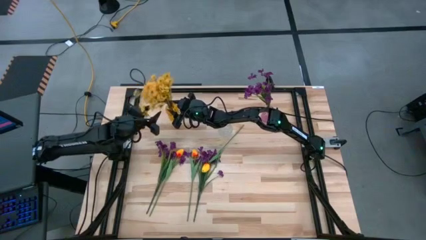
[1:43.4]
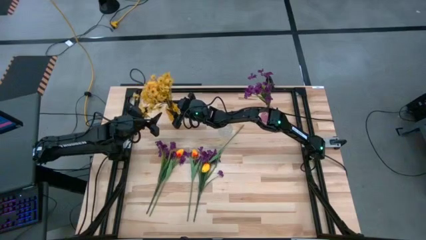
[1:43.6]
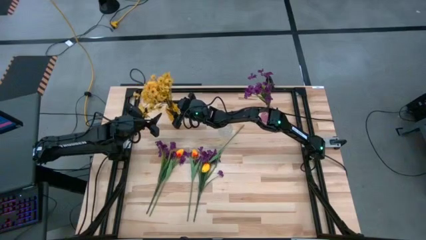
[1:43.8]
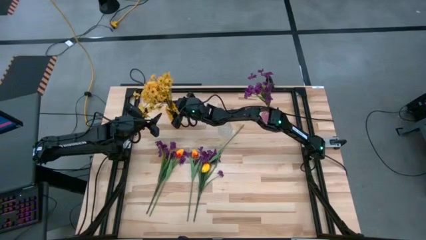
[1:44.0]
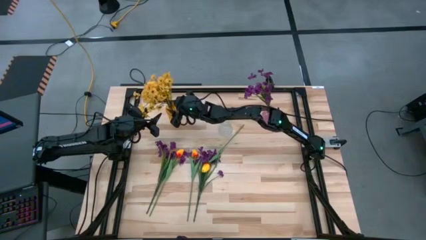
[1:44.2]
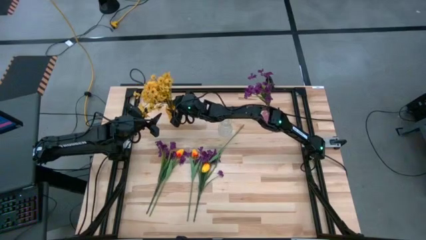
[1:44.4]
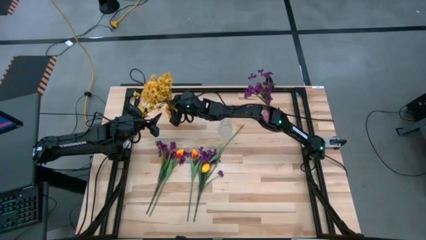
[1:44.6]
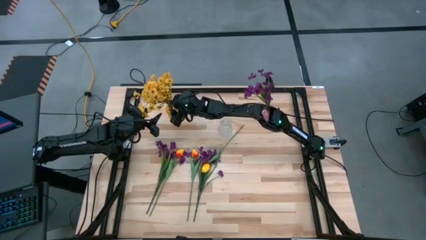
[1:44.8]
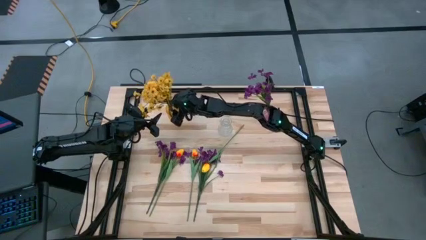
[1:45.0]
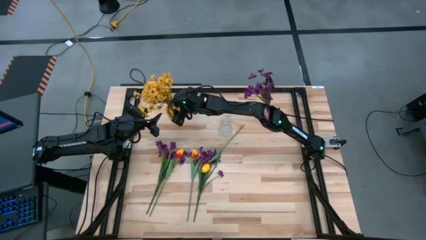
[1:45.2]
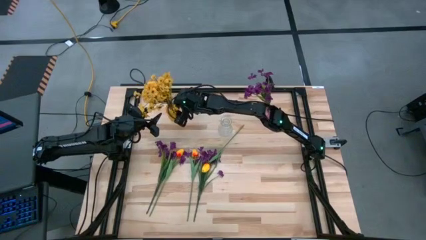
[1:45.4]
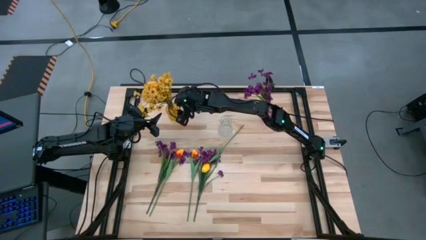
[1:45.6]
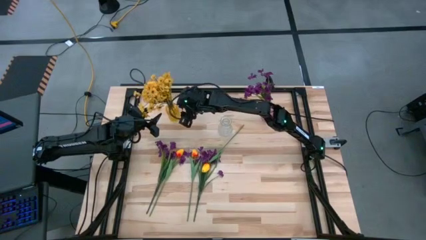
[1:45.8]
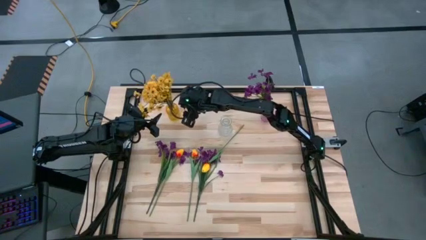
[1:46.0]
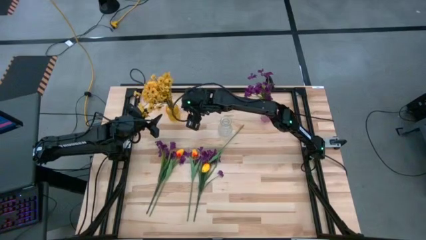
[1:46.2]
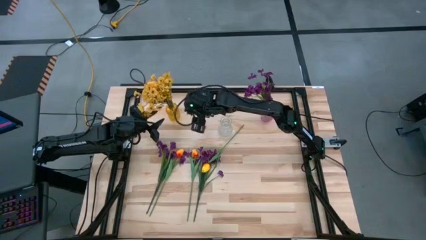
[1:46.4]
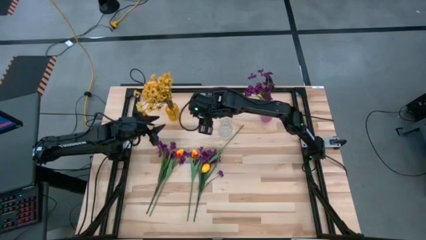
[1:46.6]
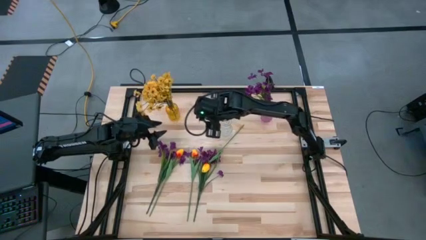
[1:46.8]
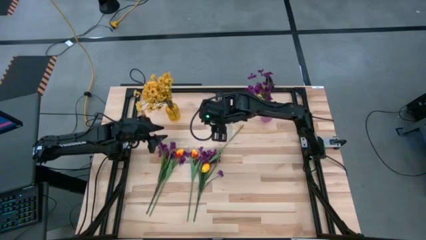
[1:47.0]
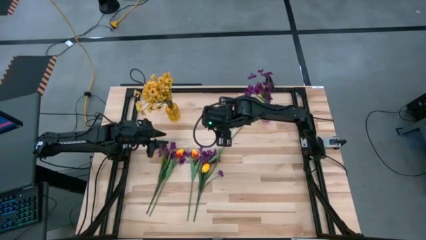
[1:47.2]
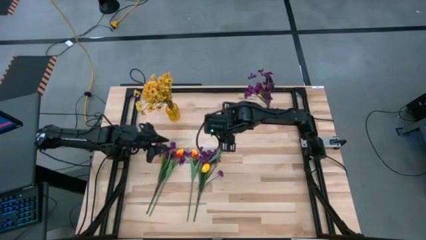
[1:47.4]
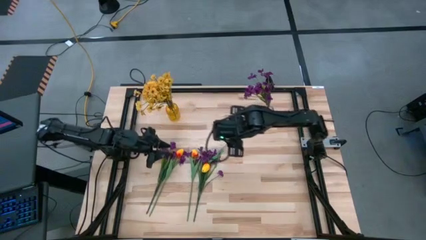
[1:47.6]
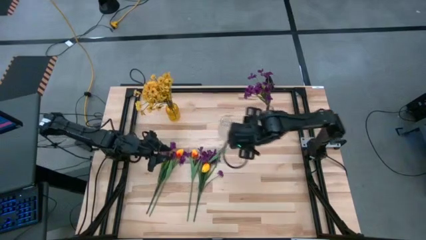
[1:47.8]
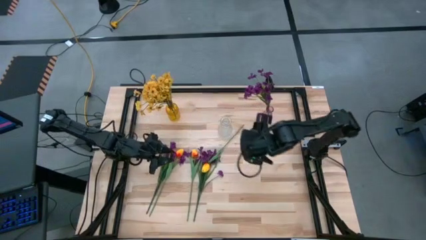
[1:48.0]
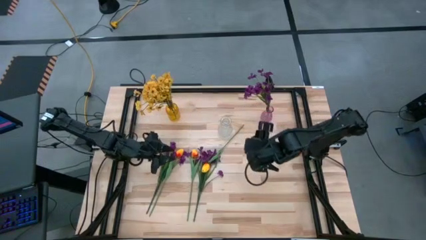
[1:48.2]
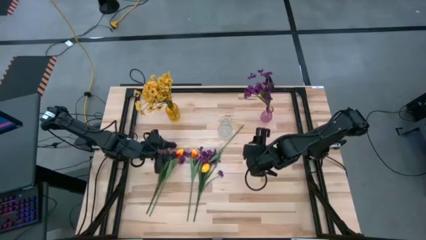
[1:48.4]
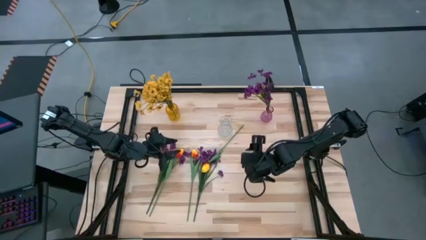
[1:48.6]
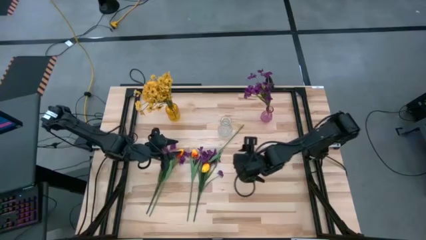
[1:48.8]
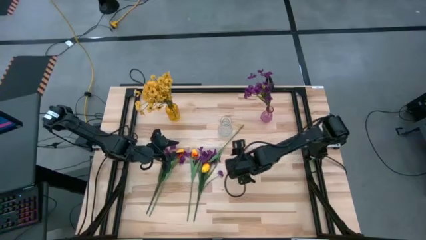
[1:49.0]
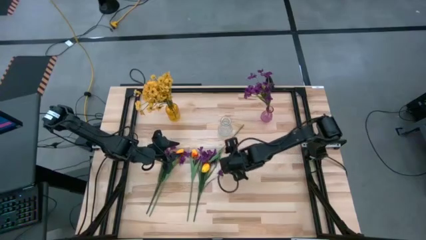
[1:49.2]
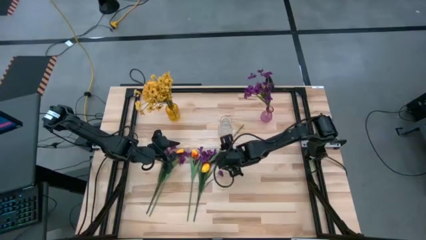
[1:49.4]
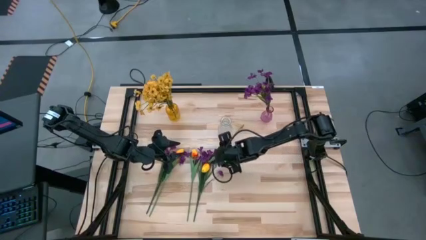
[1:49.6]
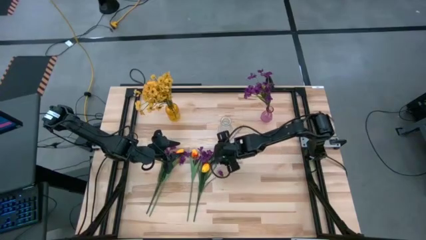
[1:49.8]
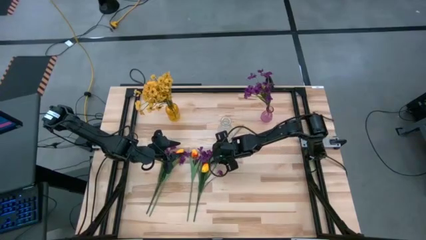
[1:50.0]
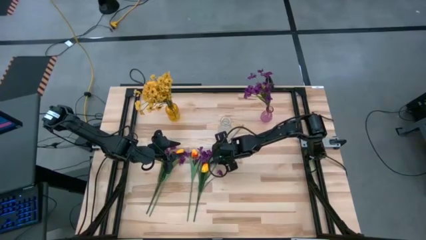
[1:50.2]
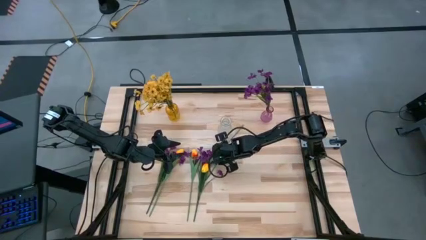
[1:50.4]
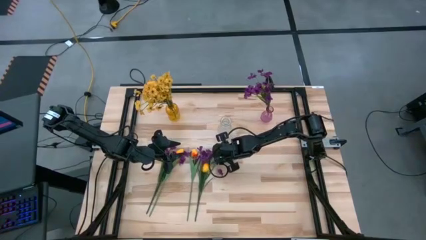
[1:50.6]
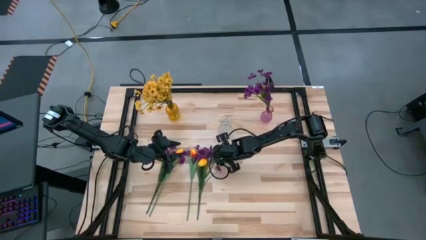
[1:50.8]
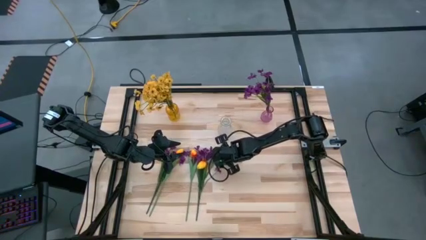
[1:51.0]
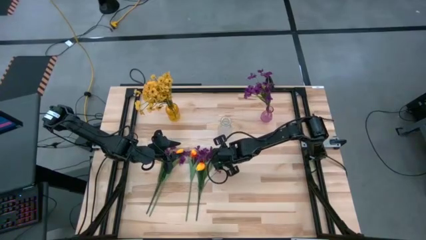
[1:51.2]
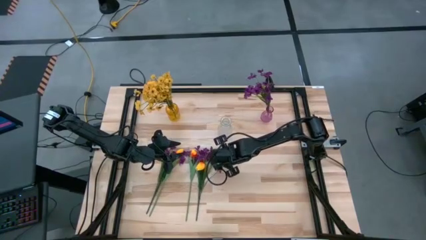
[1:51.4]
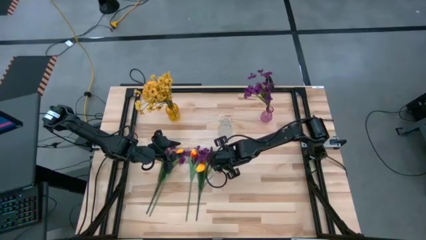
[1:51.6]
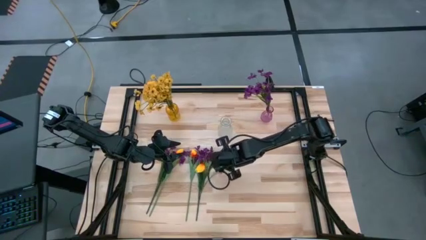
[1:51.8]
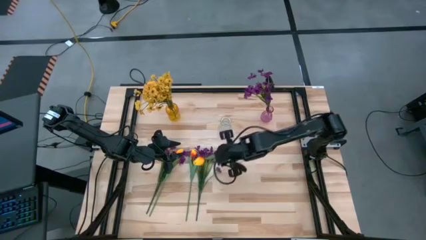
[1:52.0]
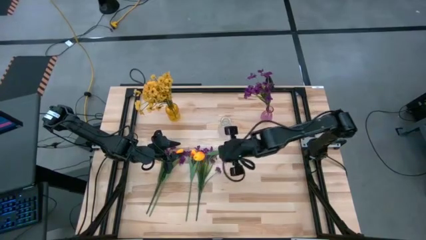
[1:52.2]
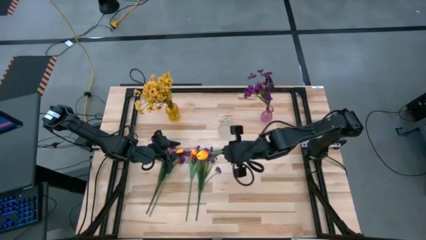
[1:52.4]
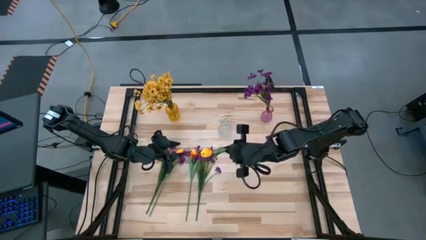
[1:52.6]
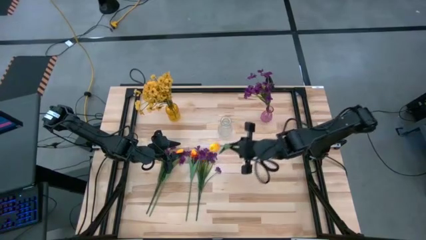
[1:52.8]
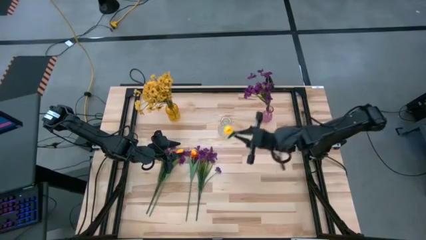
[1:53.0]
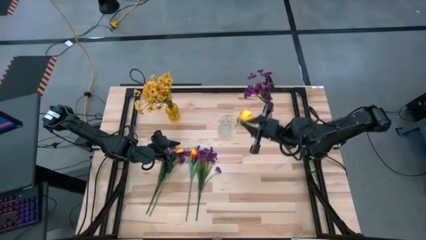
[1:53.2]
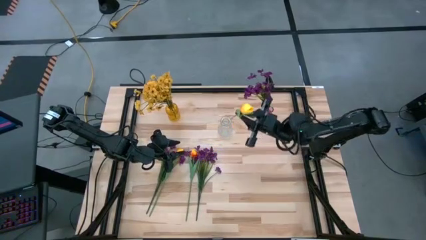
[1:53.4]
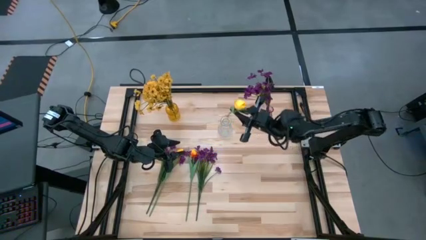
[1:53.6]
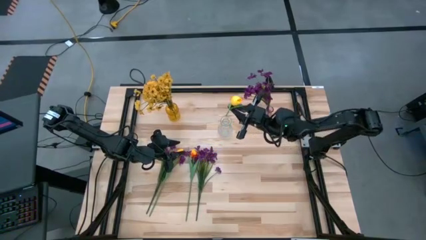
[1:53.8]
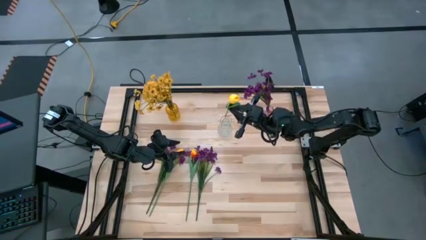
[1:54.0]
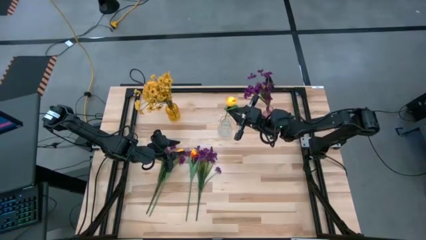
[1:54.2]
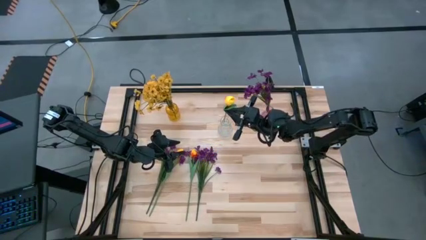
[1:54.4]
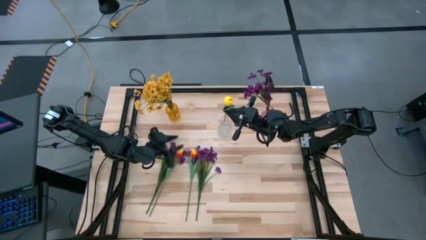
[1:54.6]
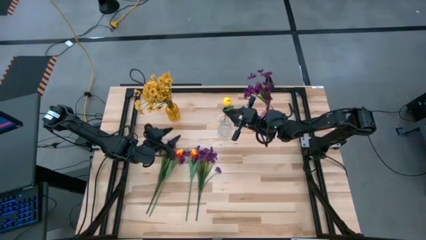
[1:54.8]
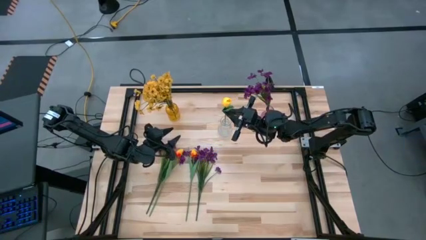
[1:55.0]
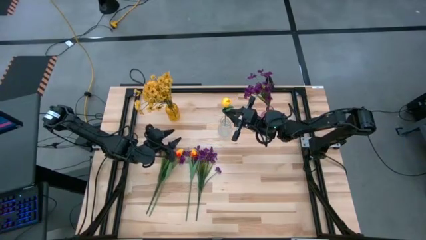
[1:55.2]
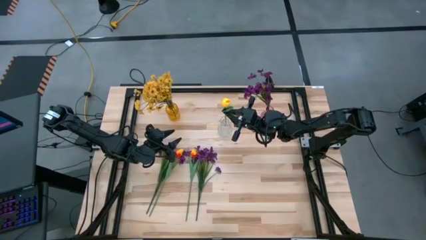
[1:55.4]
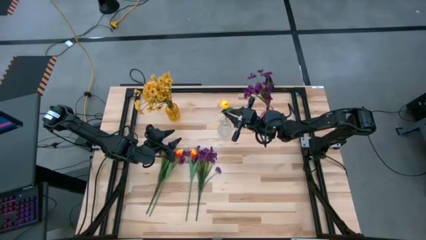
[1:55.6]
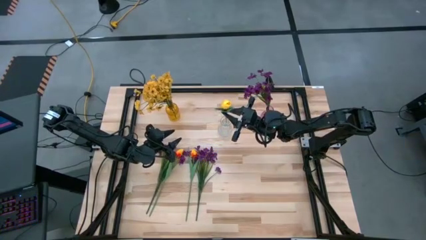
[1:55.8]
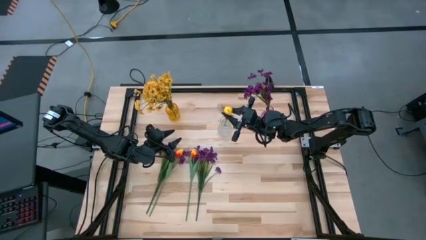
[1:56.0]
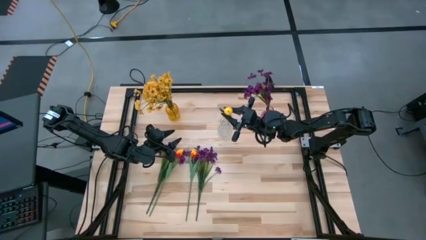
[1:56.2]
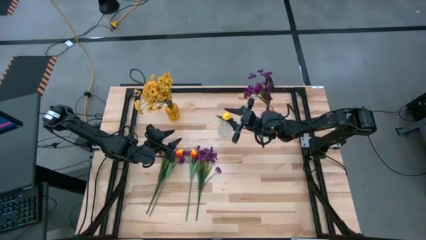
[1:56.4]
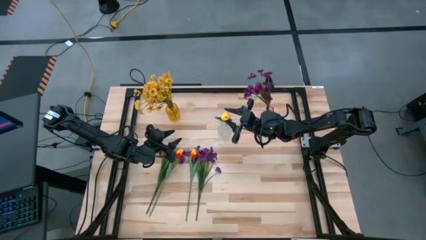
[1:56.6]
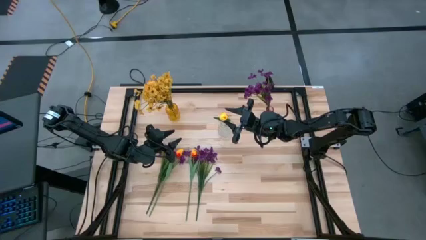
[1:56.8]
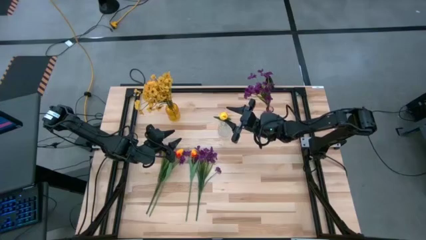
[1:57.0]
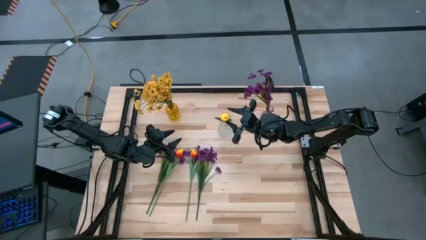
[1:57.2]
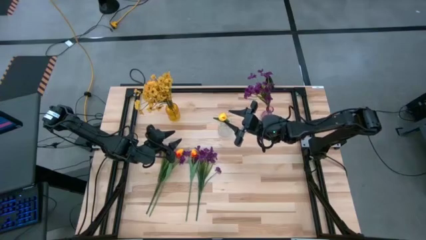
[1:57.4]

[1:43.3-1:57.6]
Task: Sort flowers into vase by color
Put the yellow tulip into the transparent vase
